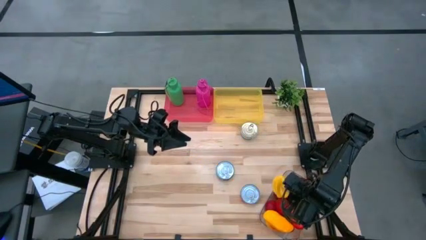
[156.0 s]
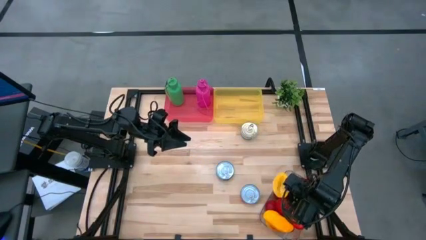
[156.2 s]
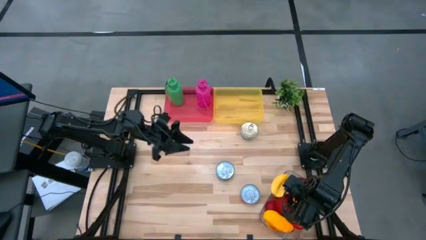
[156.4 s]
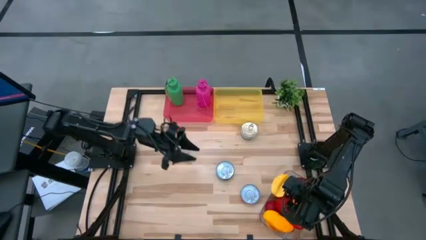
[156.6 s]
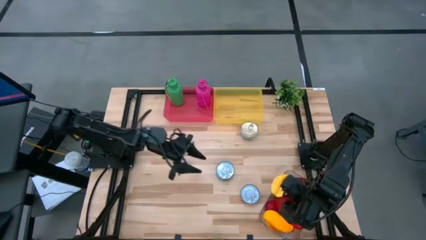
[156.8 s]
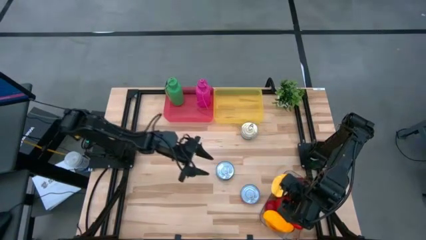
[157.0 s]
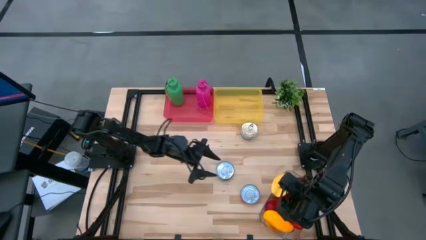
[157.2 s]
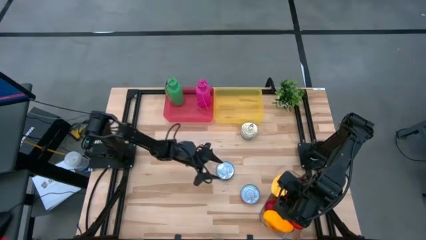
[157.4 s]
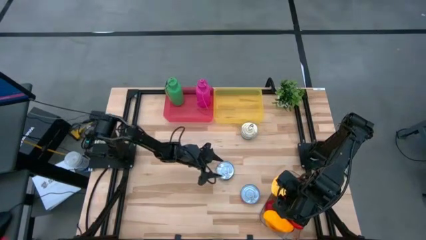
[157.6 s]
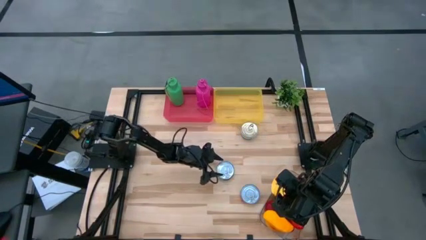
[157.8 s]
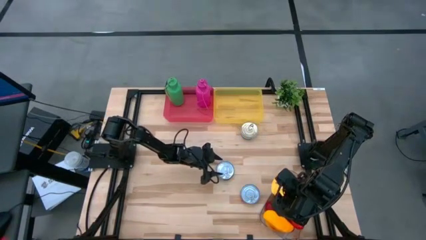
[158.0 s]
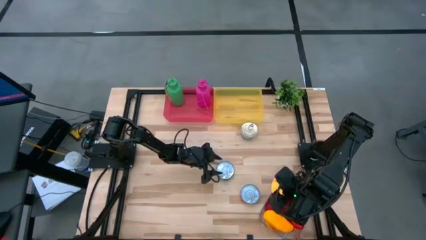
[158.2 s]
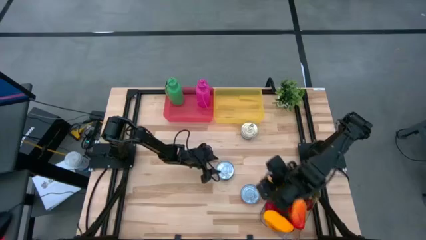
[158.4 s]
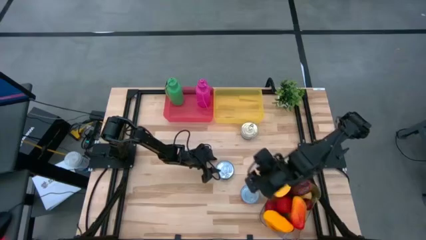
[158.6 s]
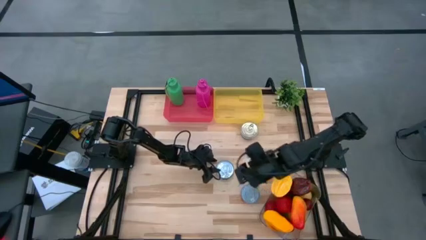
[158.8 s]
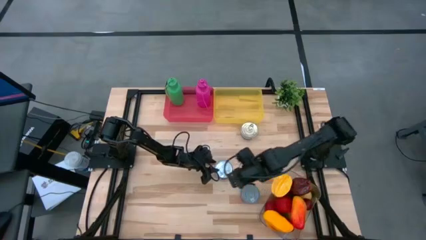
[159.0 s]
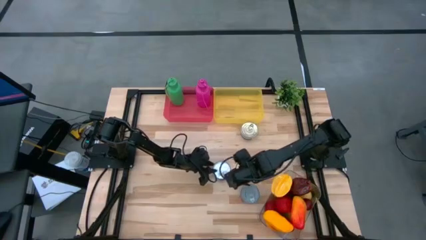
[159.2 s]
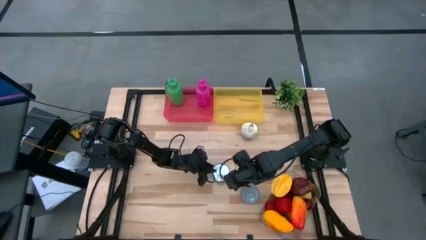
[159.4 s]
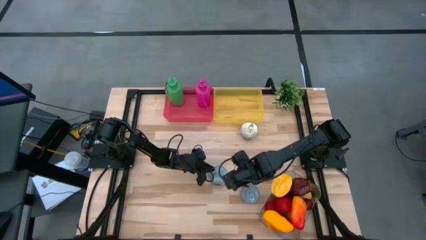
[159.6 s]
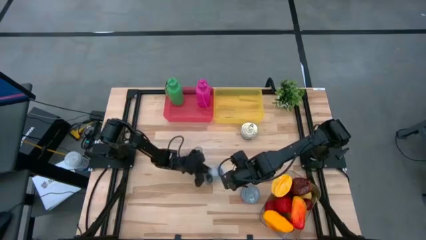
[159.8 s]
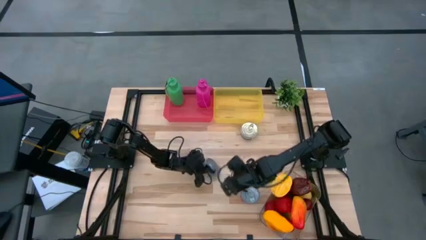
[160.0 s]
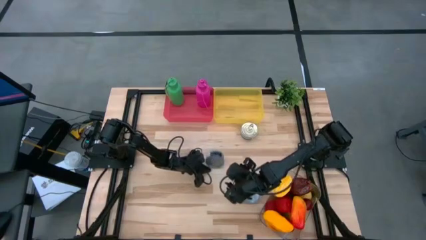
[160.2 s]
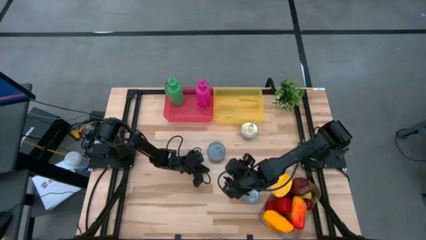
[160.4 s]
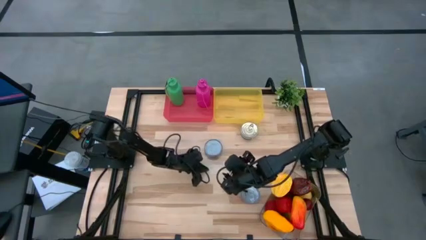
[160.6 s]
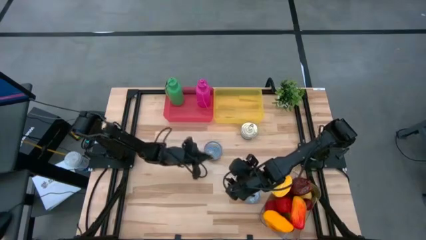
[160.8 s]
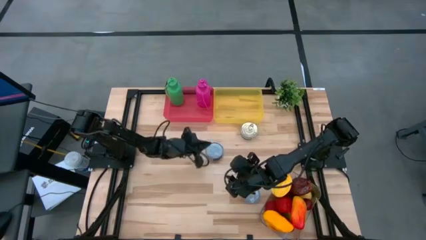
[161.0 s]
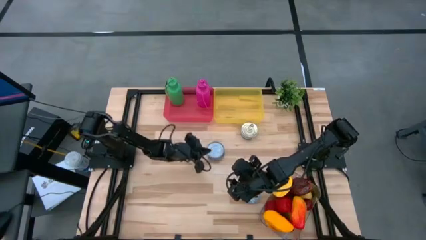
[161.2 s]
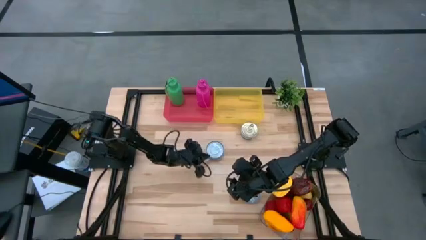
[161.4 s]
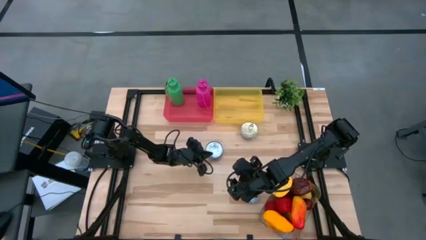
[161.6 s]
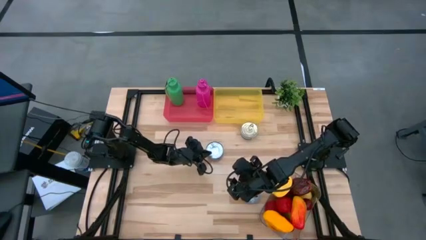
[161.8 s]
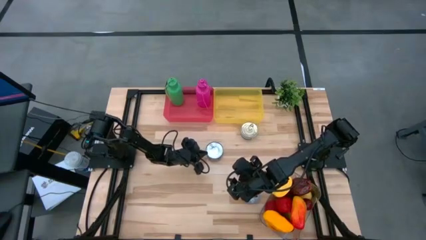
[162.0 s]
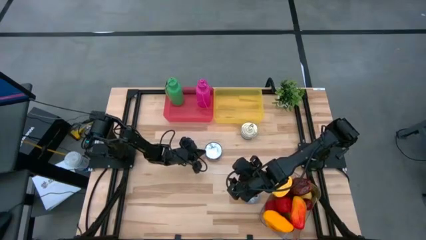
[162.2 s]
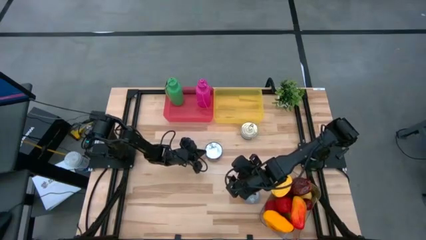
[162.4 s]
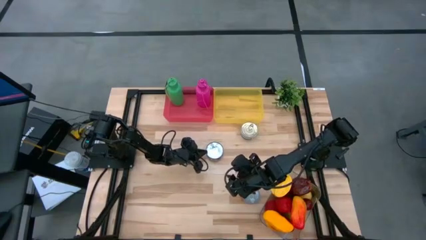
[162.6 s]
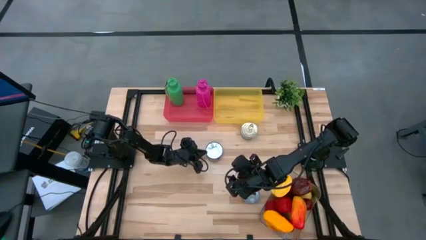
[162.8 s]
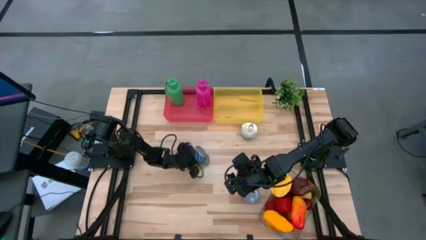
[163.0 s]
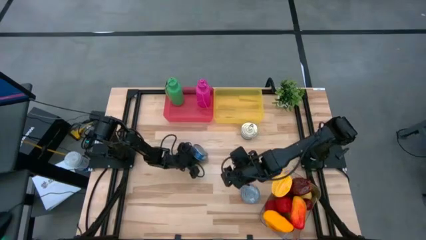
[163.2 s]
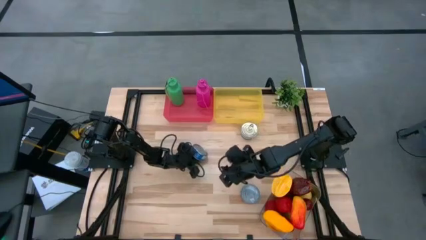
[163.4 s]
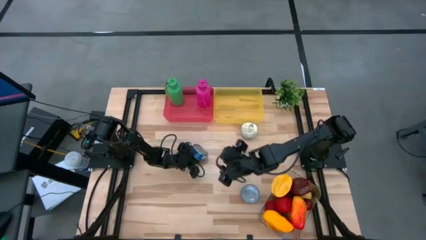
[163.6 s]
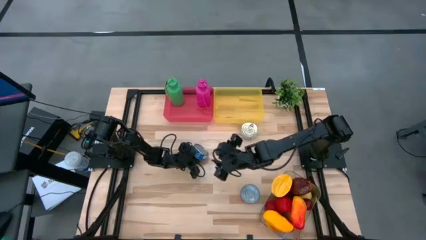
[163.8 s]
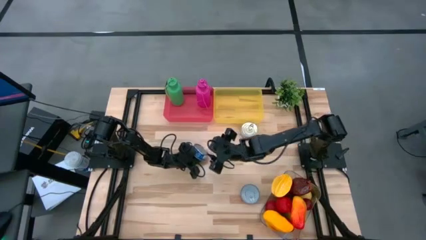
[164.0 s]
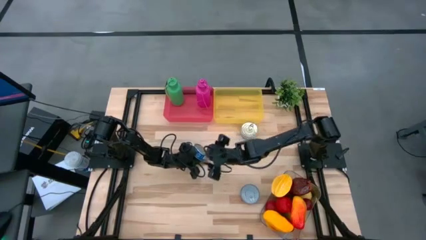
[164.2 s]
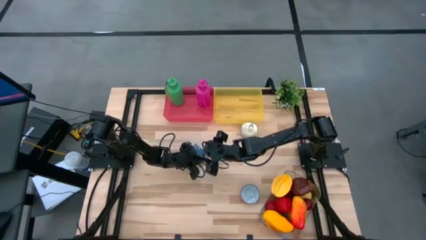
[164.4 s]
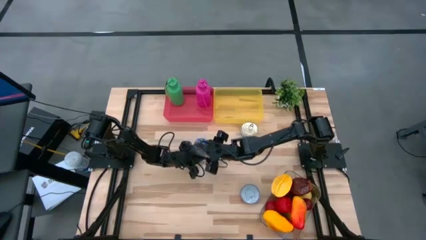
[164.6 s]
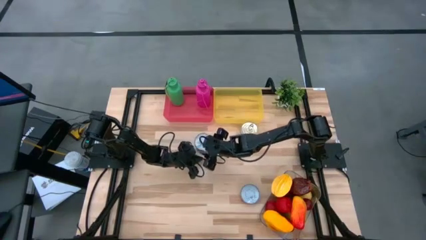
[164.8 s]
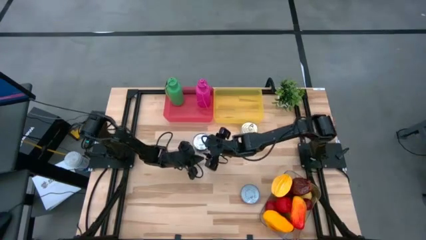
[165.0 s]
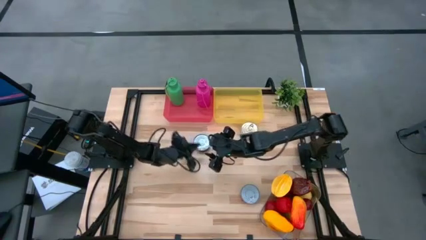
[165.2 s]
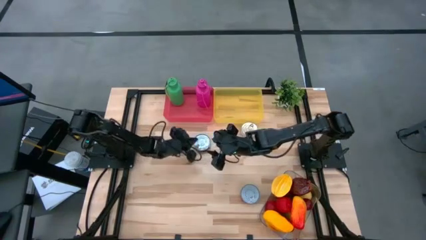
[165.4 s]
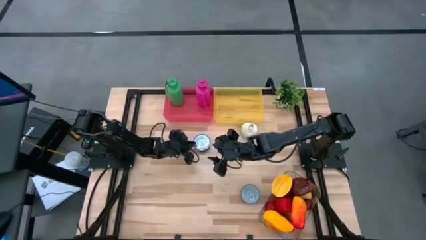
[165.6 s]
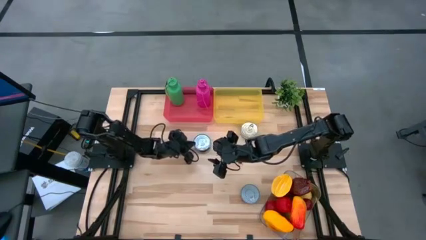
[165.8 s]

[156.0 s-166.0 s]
Task: Pick & Place Food Item
Put the blue tuna can into the yellow bin

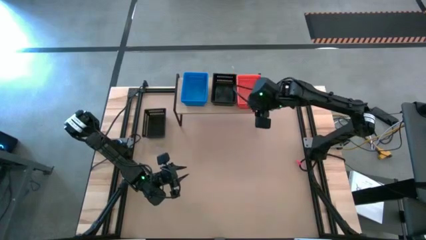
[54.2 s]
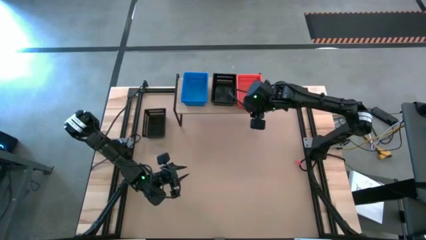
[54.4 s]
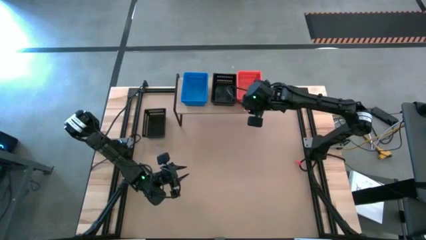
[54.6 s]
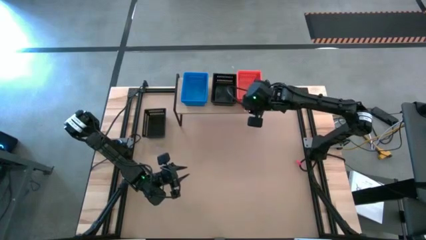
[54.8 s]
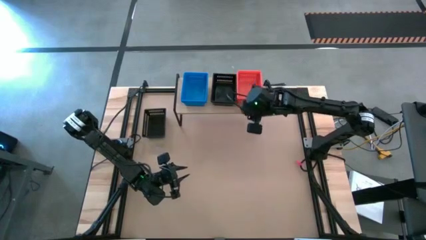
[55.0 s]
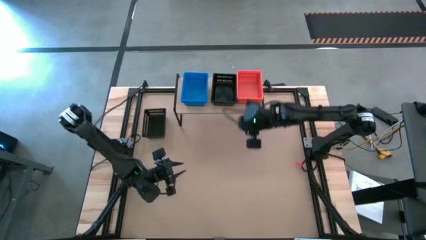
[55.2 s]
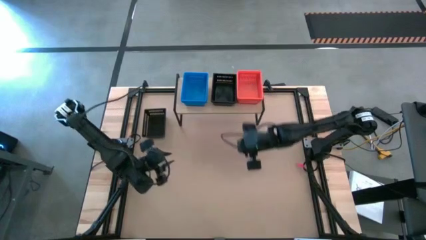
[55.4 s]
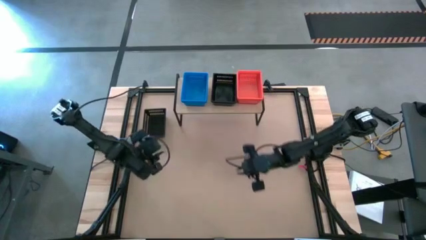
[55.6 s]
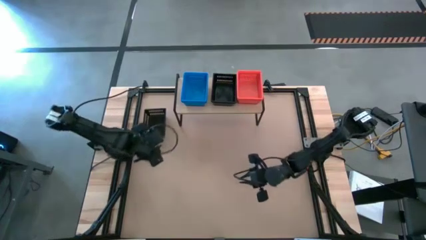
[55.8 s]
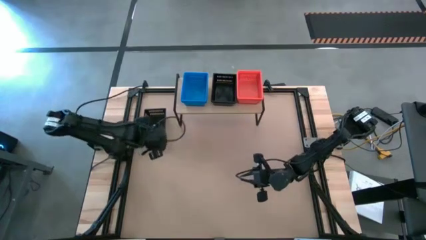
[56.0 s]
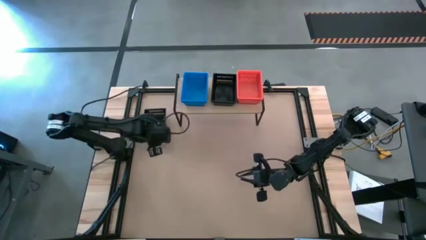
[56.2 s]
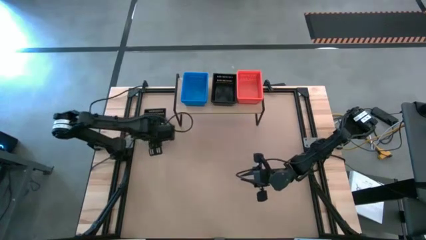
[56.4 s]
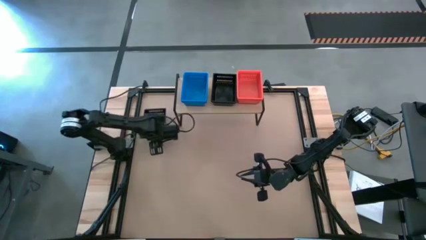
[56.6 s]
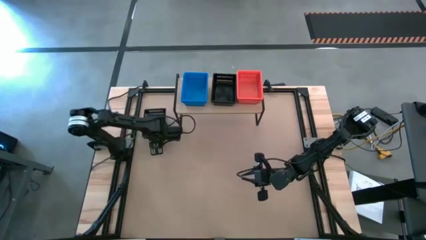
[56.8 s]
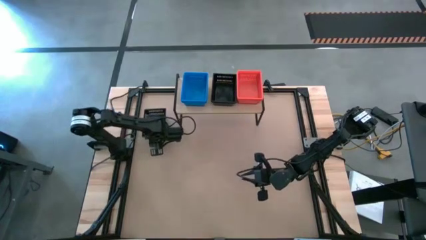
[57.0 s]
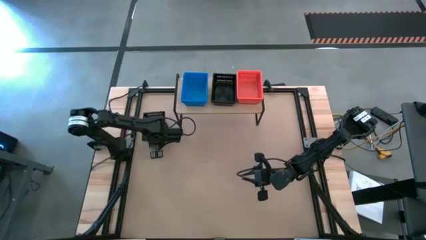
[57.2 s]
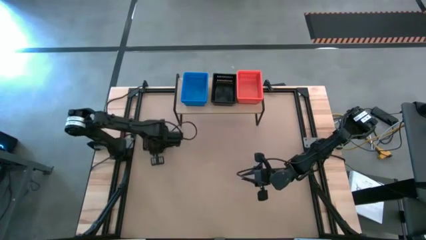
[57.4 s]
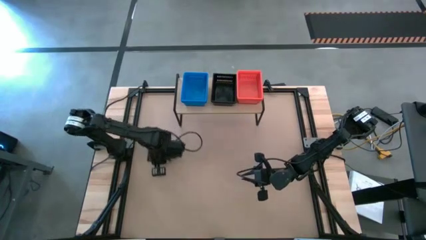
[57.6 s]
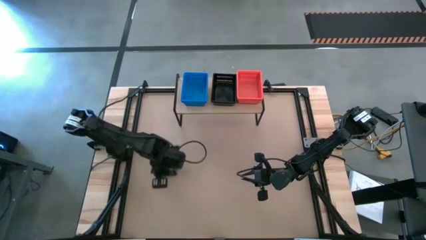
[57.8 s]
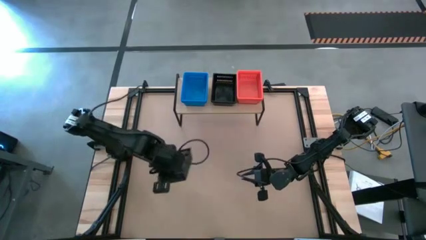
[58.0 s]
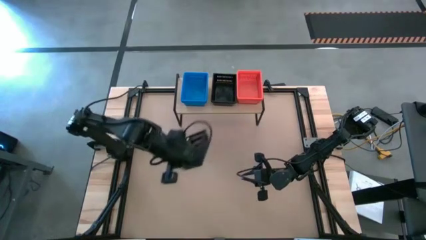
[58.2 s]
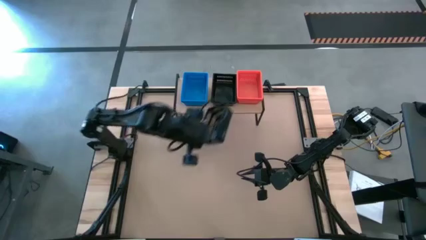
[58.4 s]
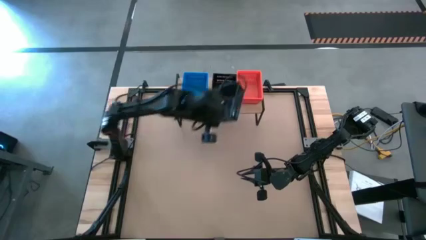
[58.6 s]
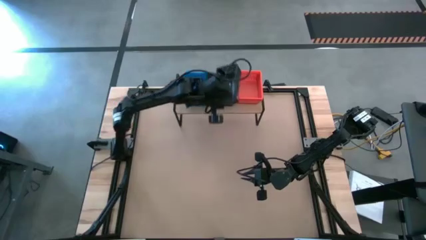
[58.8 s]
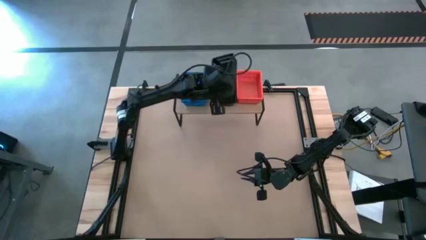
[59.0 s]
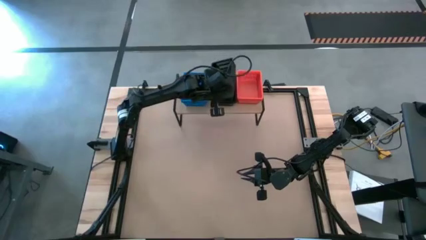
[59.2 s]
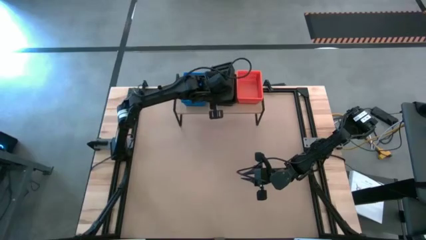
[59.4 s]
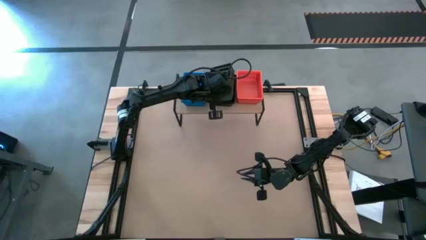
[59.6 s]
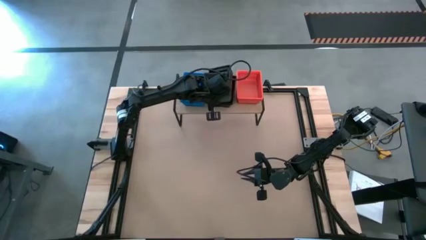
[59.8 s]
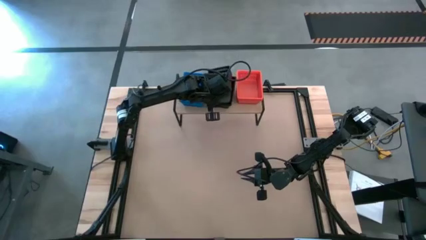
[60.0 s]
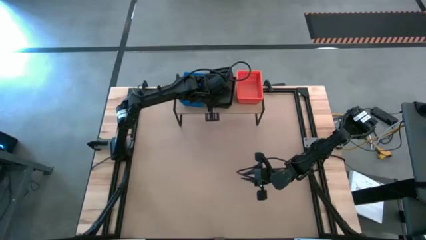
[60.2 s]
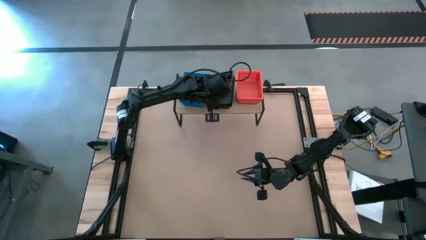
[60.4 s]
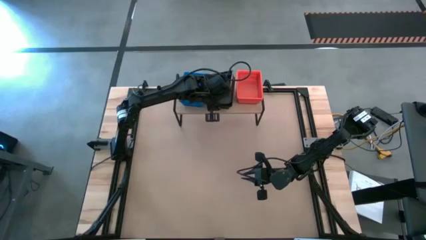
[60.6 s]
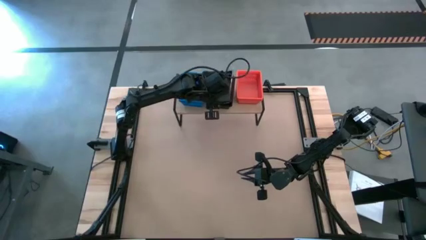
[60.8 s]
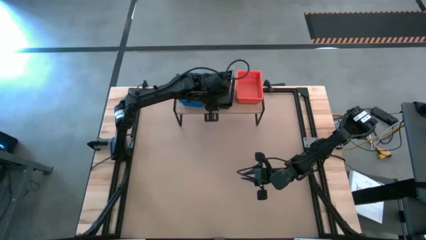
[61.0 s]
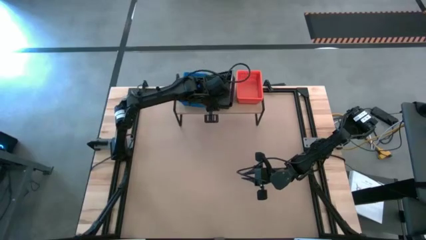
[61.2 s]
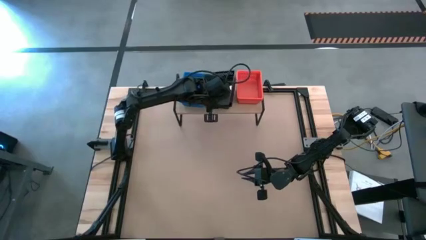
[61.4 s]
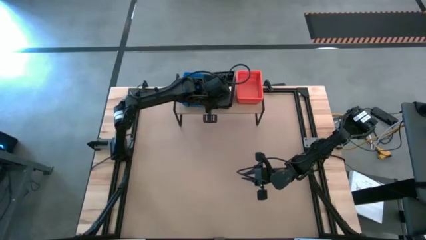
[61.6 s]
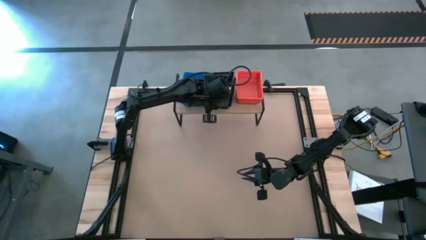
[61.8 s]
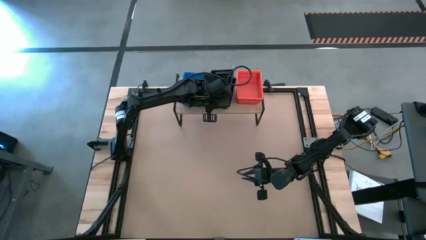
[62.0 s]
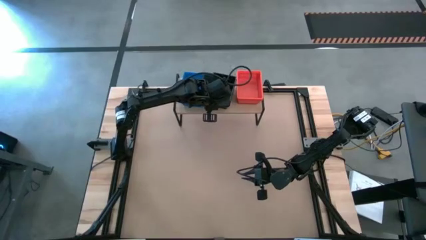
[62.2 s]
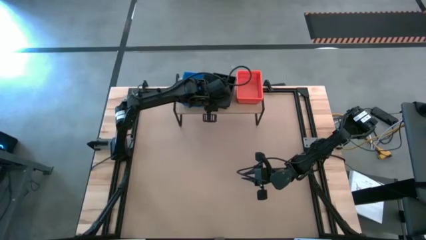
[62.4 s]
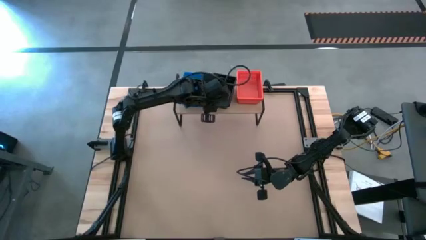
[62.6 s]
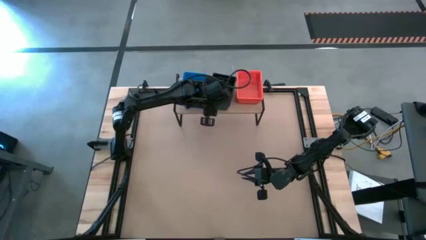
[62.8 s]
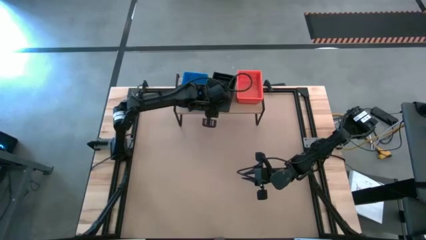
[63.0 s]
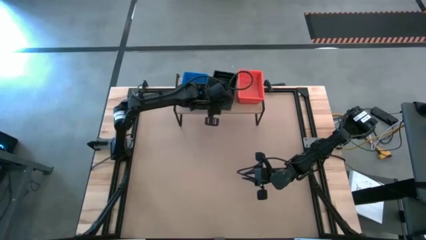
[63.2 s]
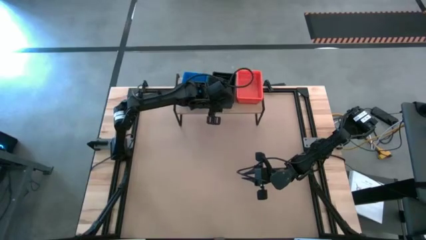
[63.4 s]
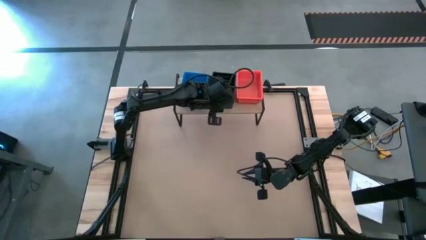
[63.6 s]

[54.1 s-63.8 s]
Task: Stack baskets on shelf by color
Stack the black bin on top of the black bin on the shelf
